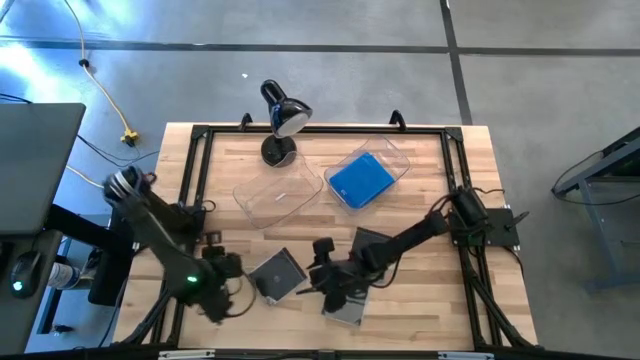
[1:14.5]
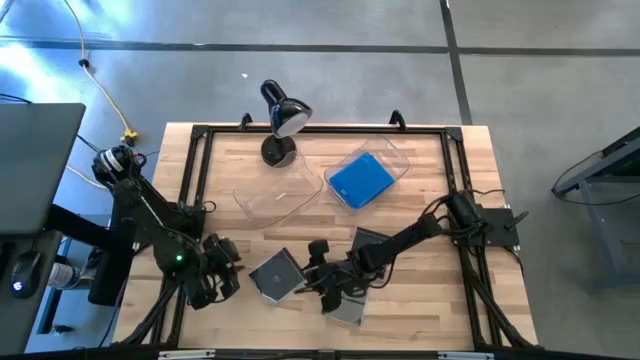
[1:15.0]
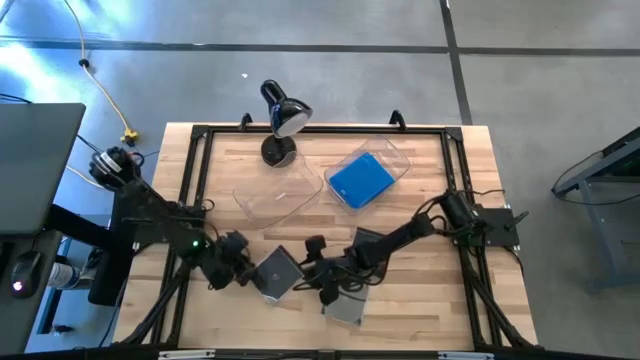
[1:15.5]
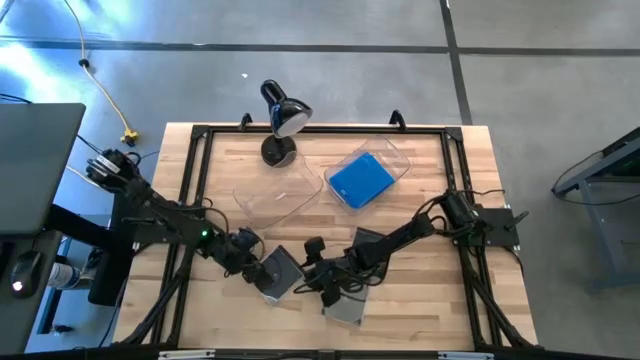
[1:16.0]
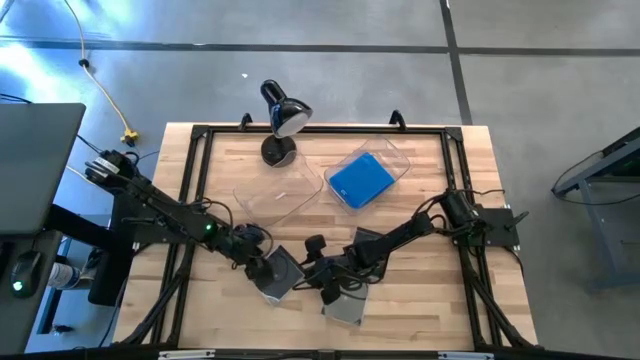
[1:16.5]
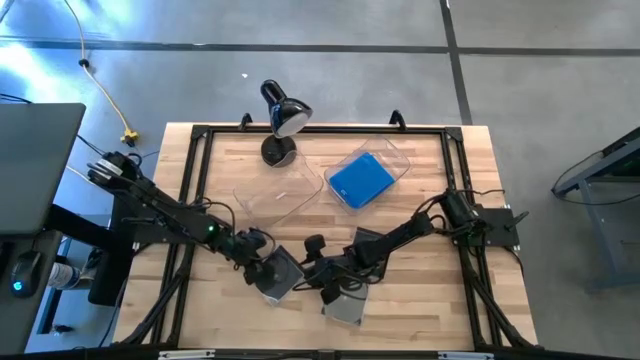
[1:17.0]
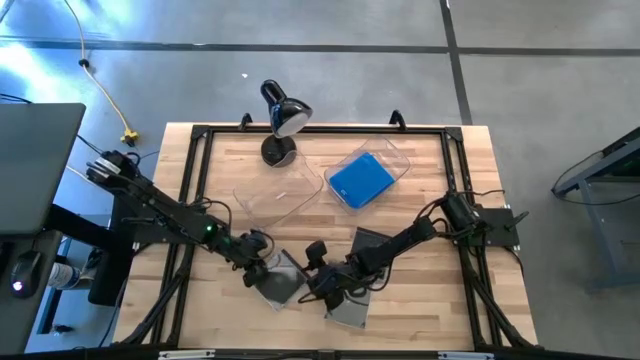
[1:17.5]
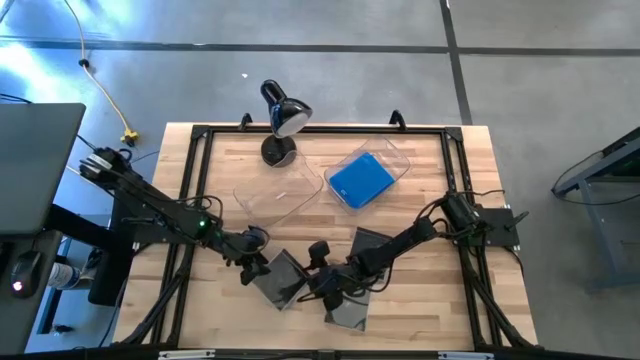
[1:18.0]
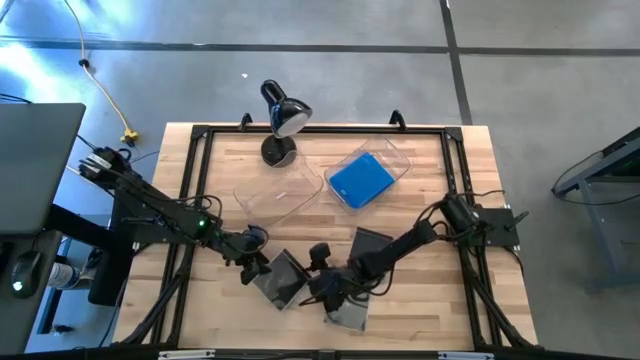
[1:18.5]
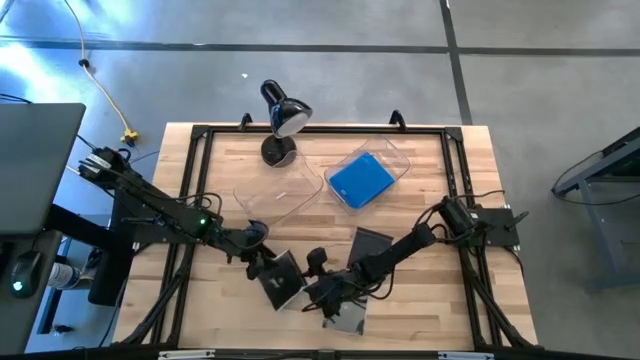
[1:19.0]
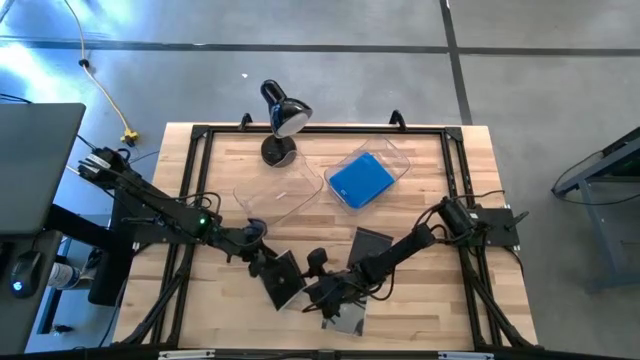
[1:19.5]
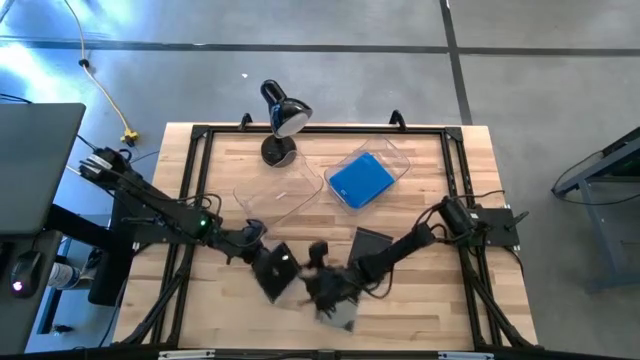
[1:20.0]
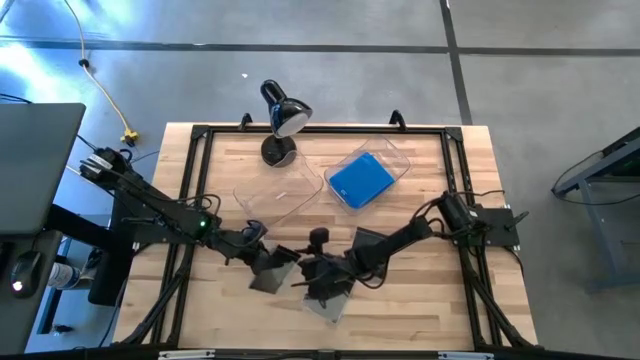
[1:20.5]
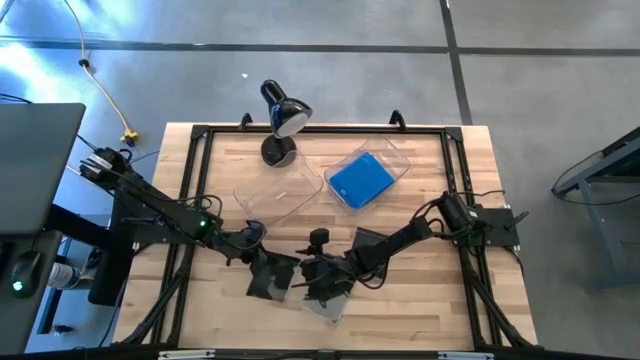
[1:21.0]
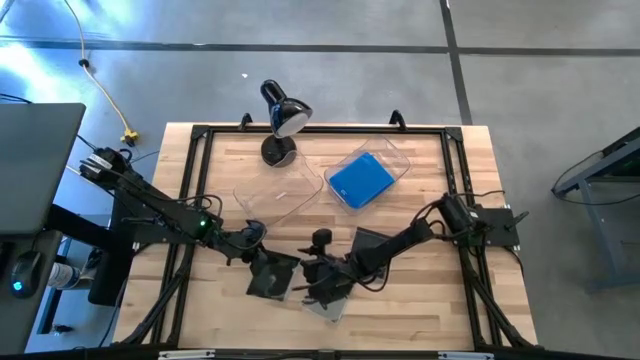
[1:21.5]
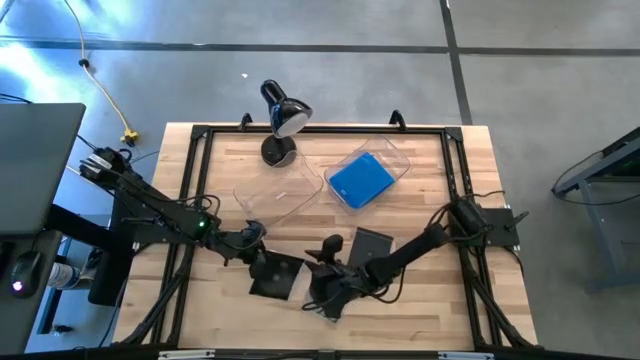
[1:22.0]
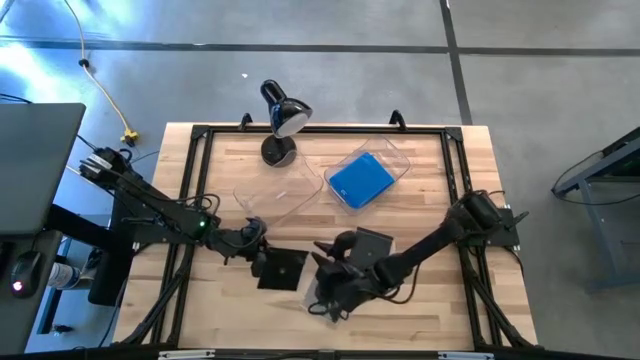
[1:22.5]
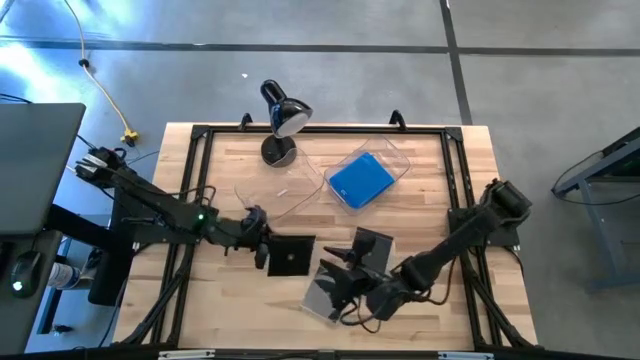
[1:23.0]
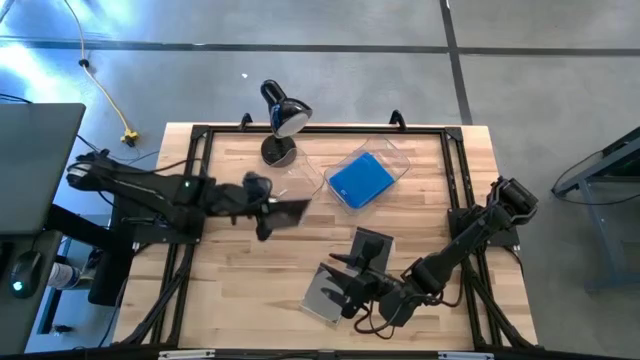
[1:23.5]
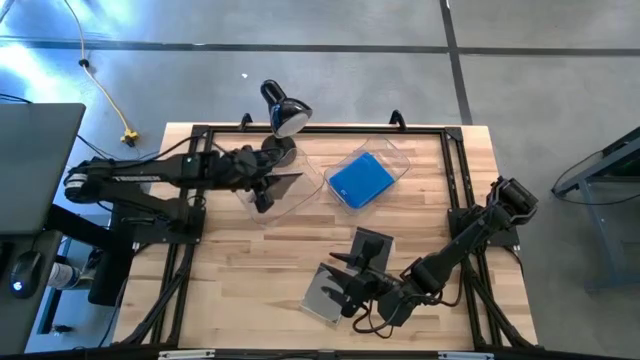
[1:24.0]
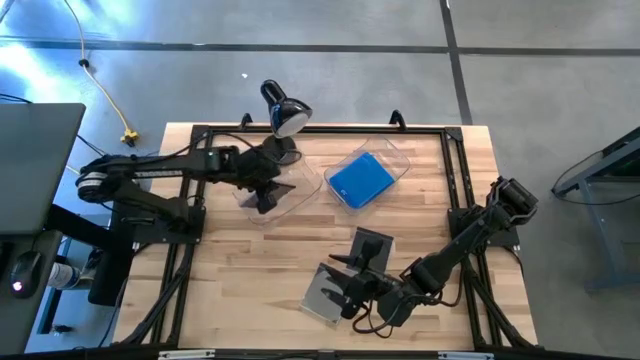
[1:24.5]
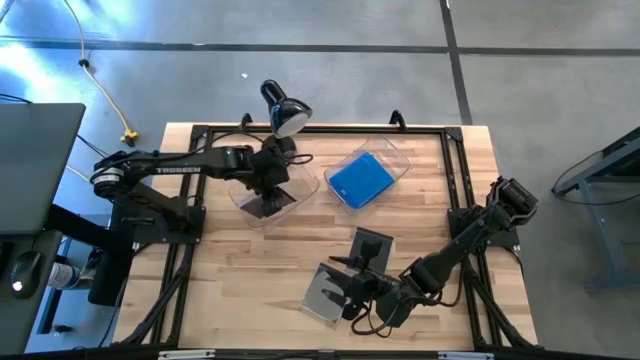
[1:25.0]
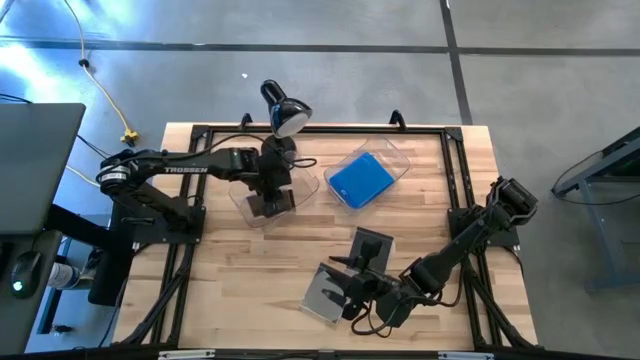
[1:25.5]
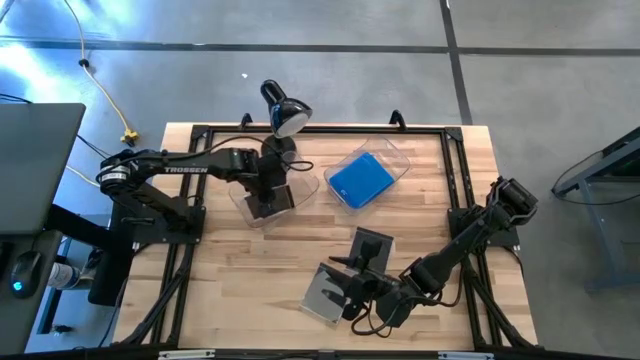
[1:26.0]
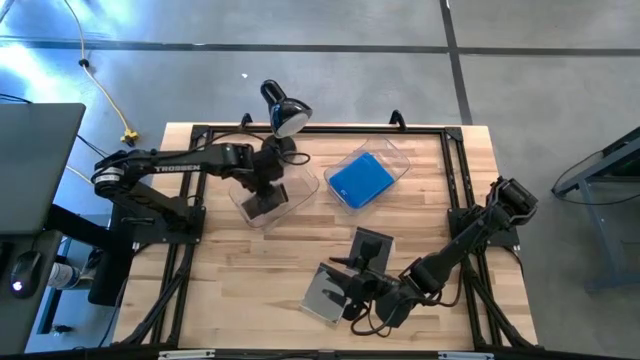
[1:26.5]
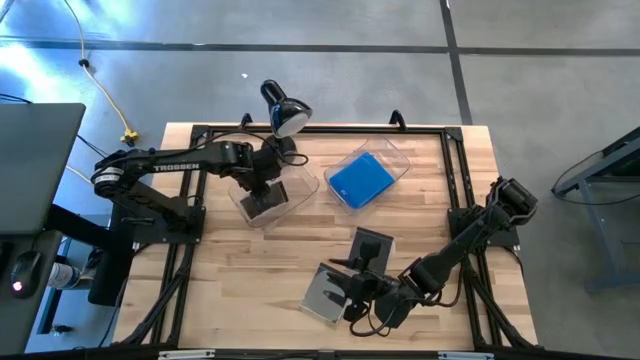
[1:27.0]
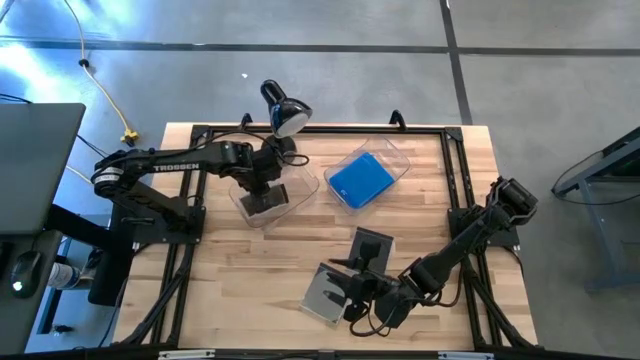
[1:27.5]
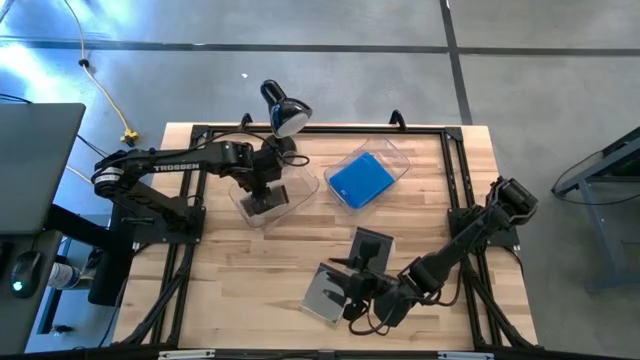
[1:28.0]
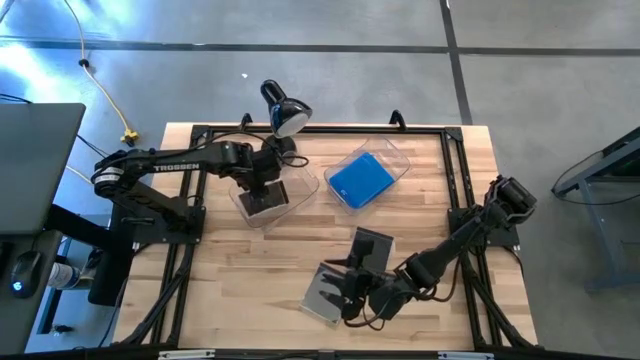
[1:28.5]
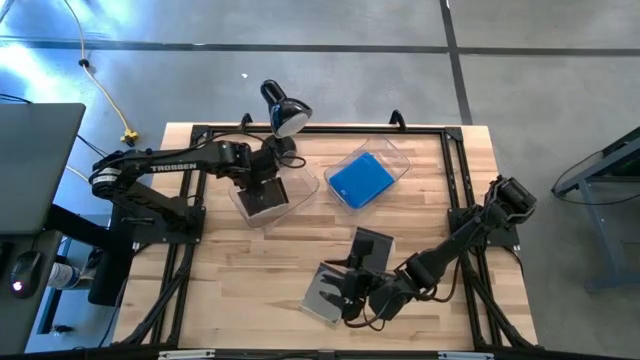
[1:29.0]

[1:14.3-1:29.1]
Task: Pick & place jewel cases by type
Put the bottom left black CD case into the left transparent bin

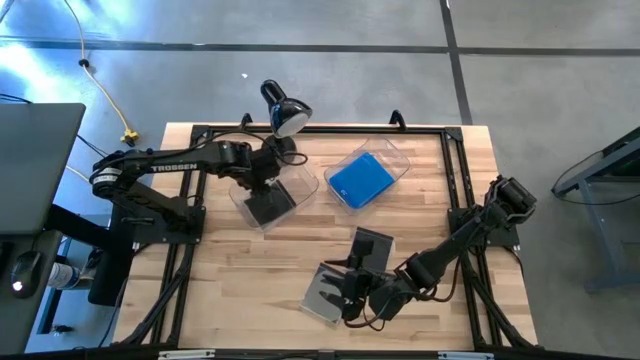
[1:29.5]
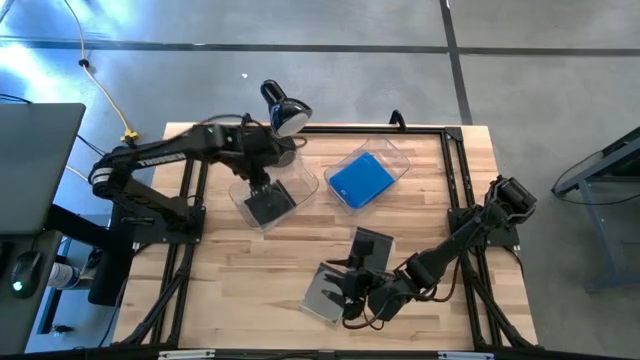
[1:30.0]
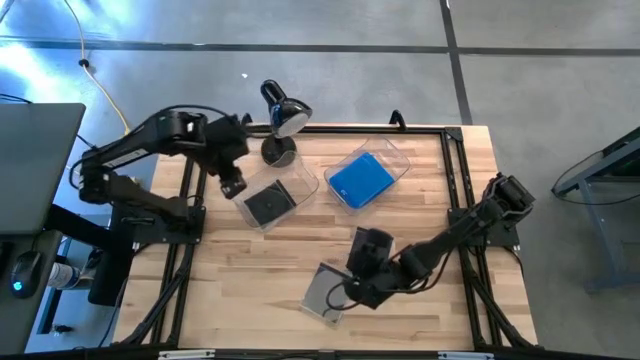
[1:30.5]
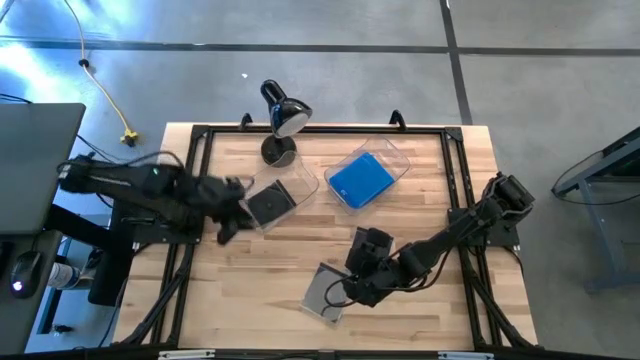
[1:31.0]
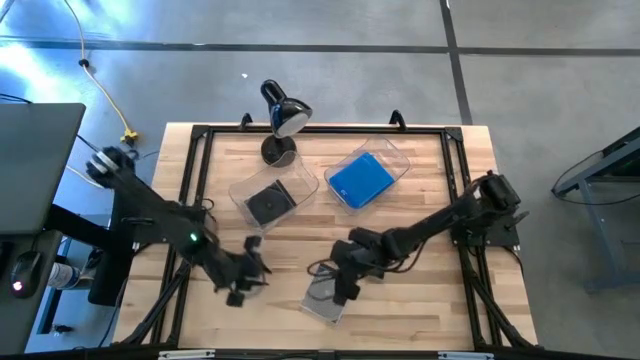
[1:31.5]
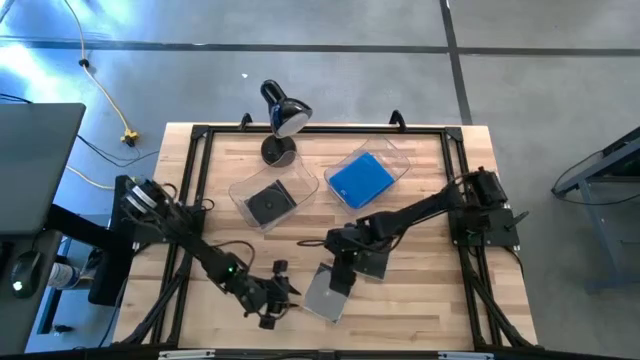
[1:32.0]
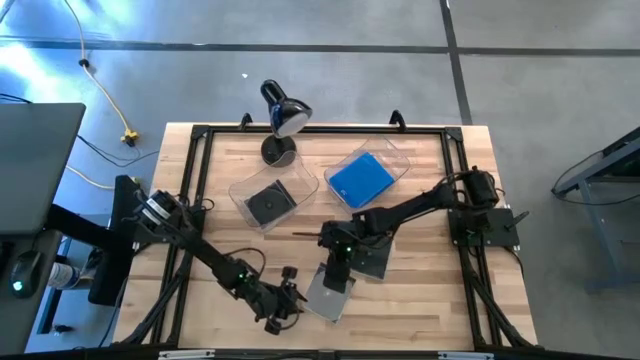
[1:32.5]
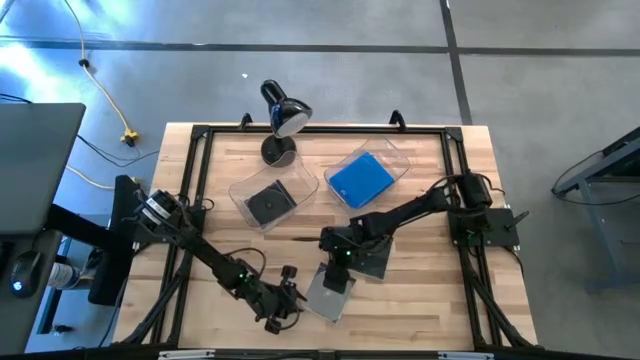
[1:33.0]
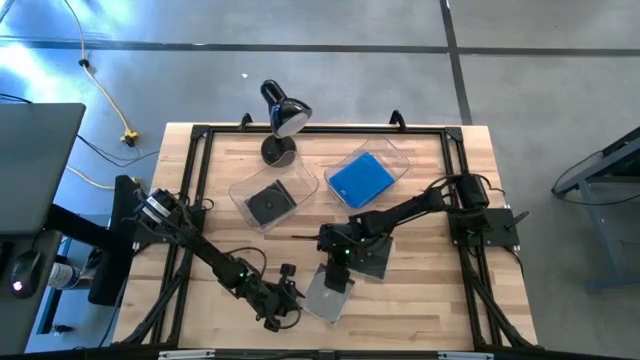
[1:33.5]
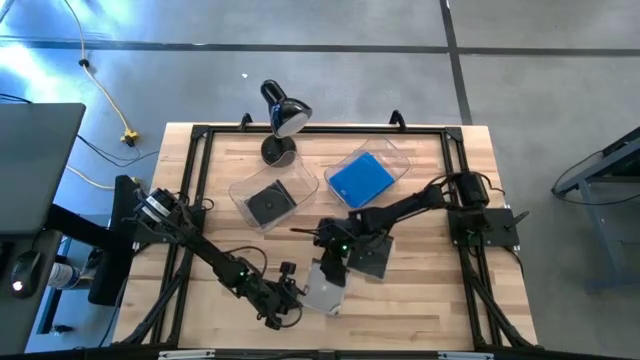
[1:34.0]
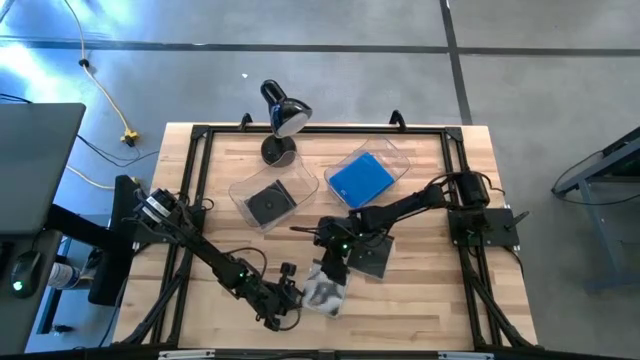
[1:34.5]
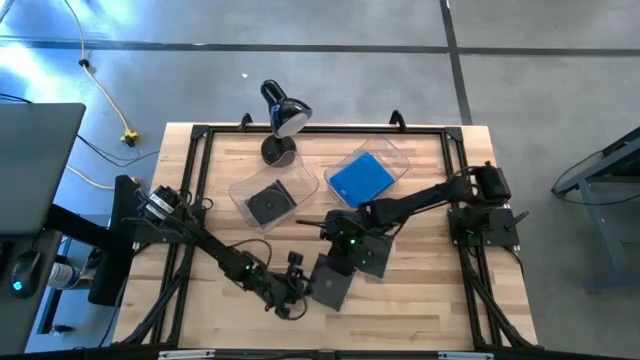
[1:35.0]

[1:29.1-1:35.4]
Put the left black CD case into the left transparent bin

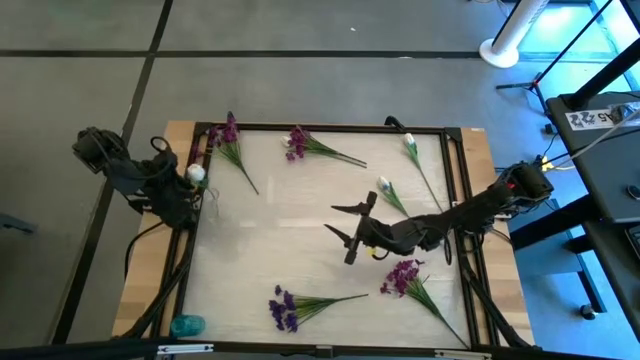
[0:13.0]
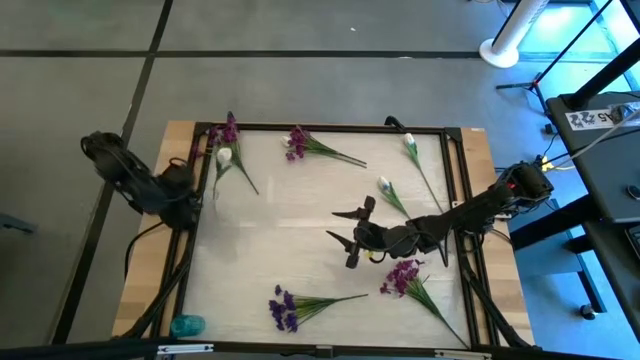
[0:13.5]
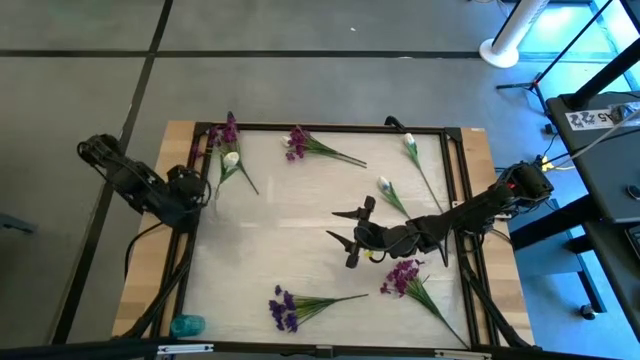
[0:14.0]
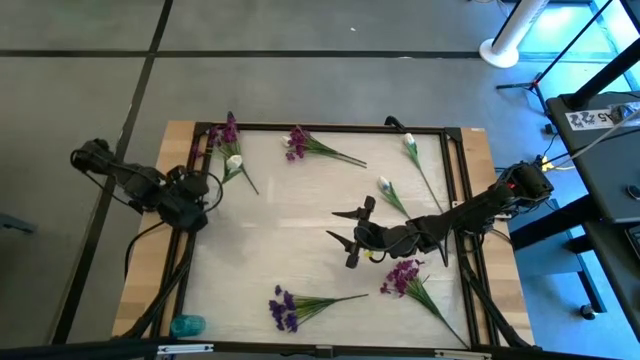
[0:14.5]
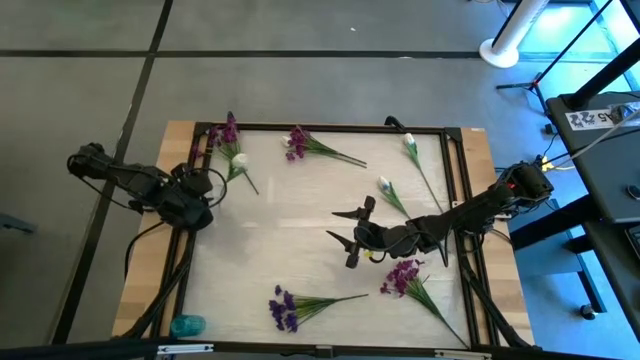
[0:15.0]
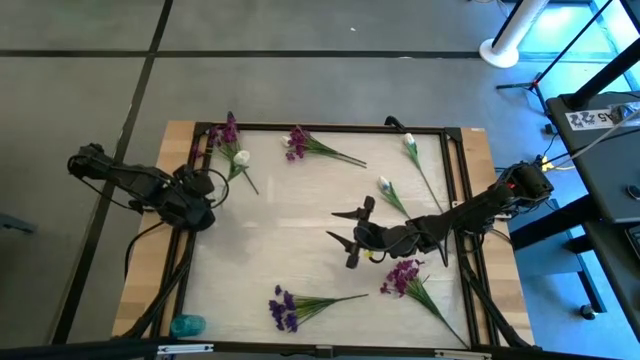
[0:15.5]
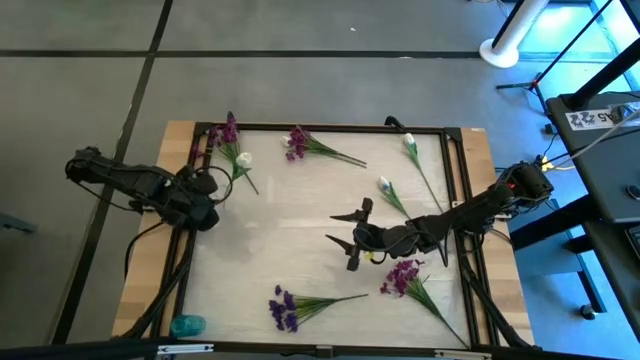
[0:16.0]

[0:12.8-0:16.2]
Task: Sort flowers into vase by color
Adjust the transparent vase
